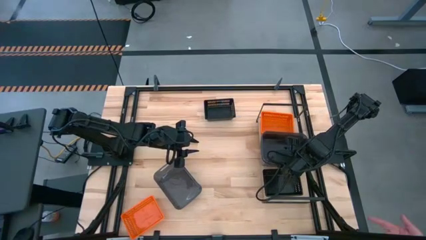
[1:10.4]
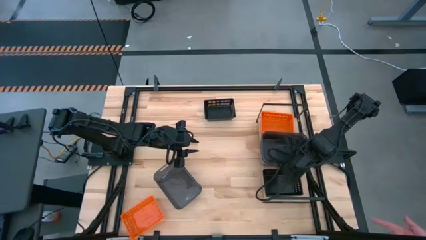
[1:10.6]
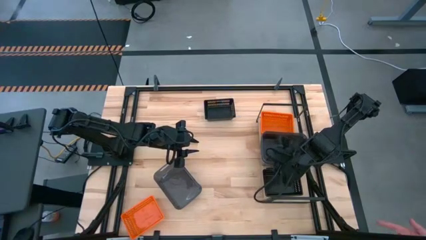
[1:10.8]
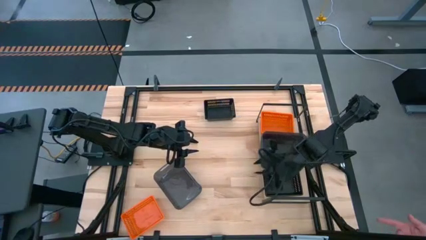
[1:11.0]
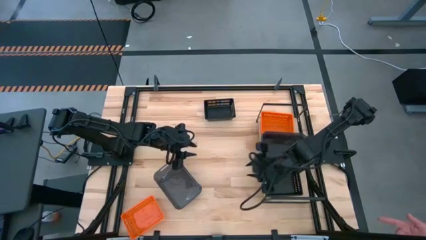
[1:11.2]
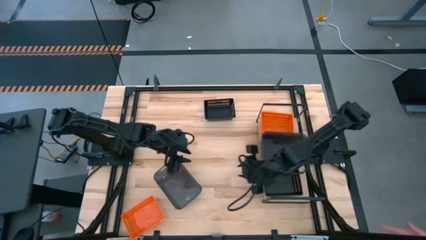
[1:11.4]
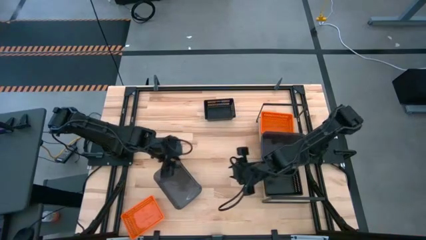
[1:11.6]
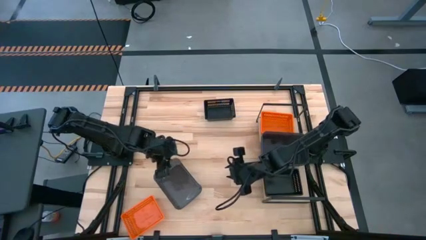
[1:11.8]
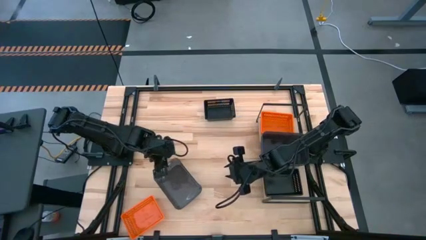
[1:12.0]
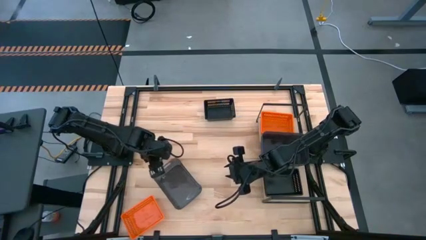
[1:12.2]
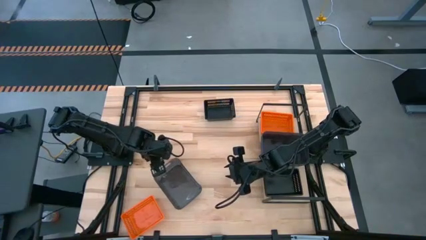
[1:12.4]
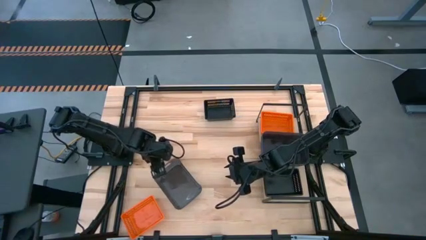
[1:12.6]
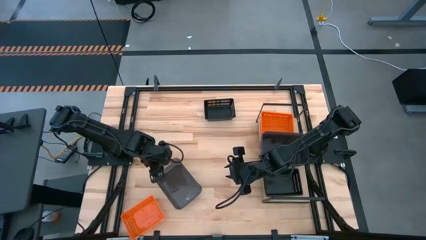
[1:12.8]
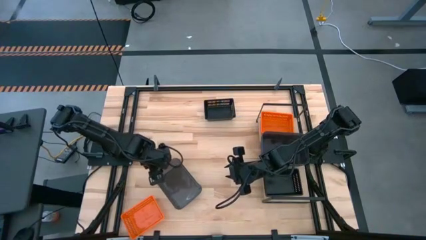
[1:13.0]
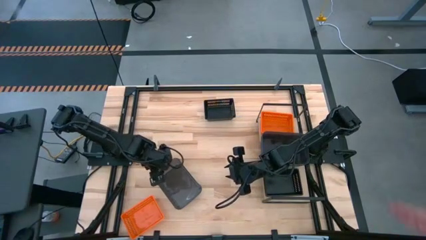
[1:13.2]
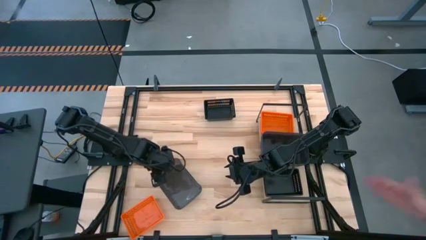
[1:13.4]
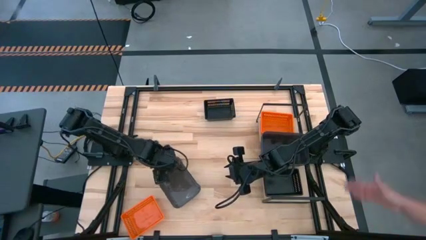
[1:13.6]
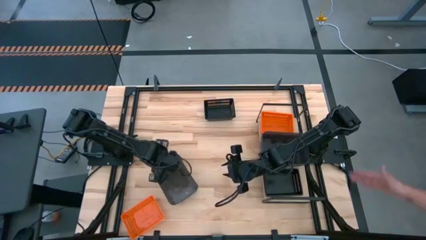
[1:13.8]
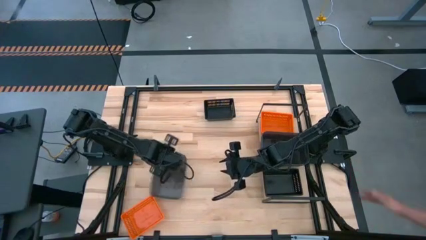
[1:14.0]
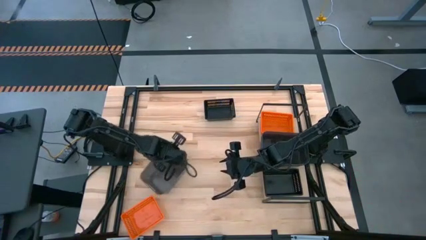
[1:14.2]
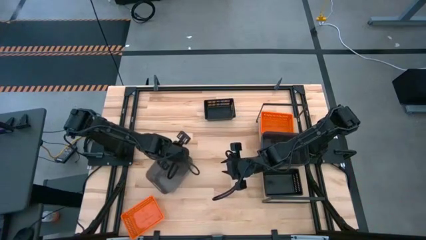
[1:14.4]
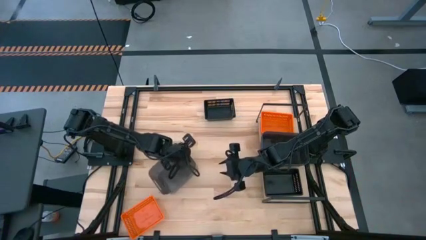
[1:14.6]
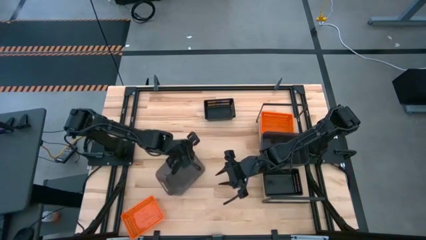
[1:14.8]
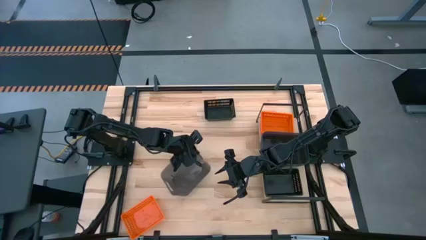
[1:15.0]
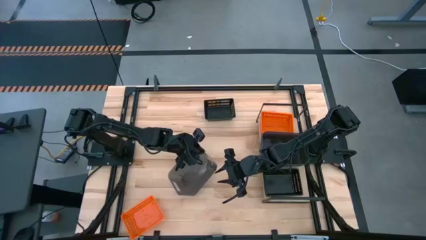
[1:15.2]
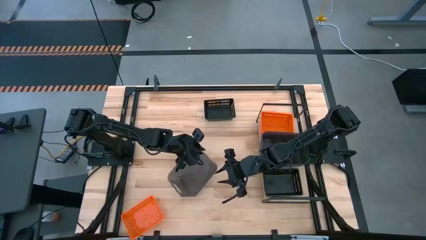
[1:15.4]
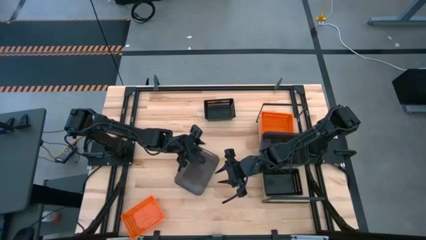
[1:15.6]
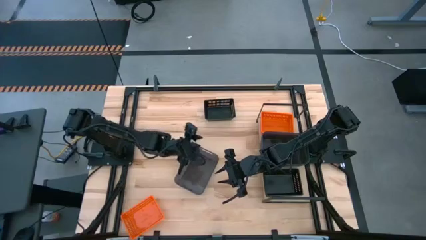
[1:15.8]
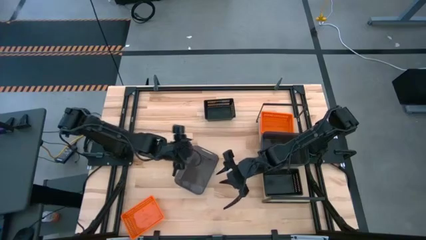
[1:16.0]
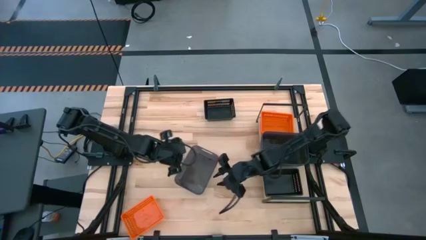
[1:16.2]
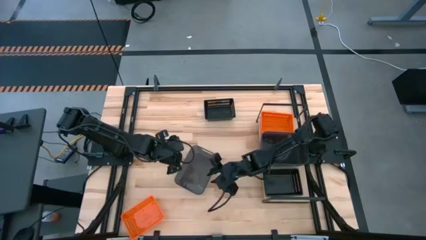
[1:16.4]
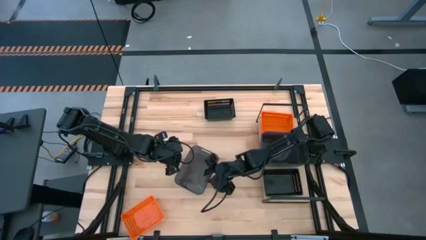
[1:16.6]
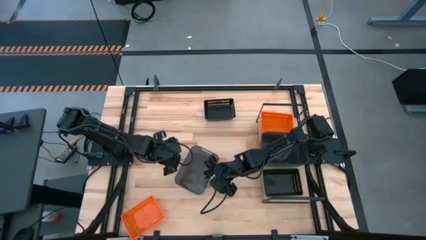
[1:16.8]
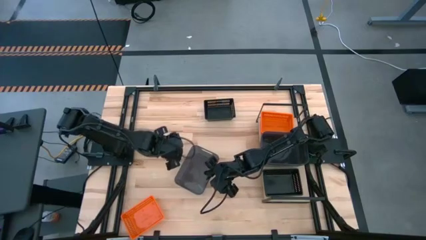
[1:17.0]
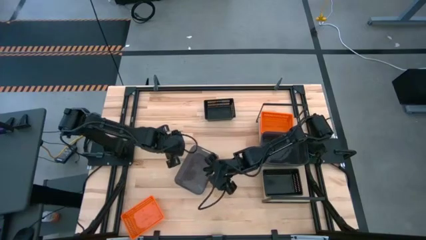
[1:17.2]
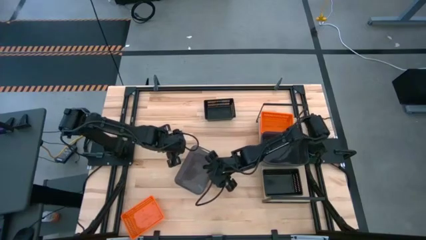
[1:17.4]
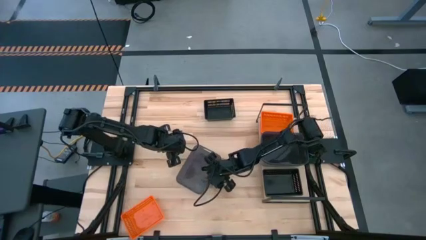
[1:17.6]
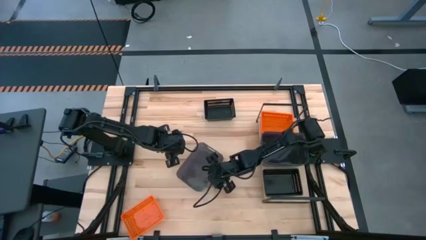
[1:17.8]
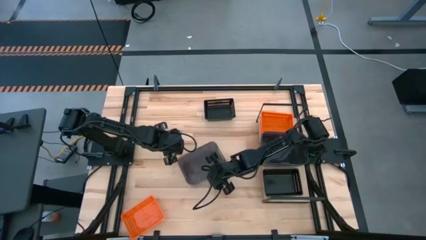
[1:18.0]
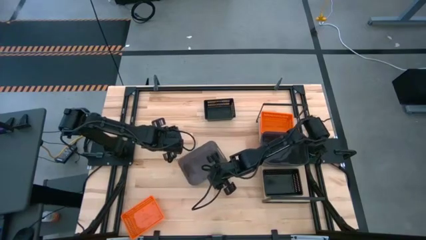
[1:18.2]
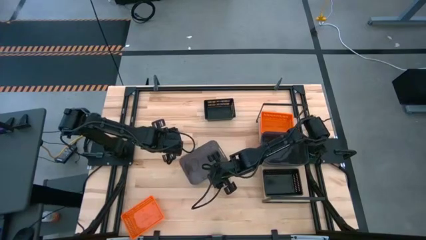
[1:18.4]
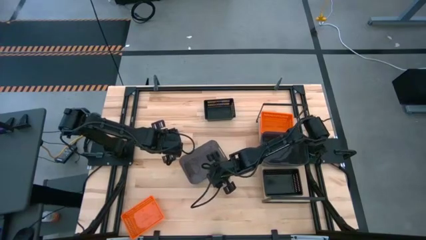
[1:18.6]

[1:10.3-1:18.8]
Task: Stack baskets on shelf by color
Stack the black transparent bin on top of the black transparent bin on the shelf

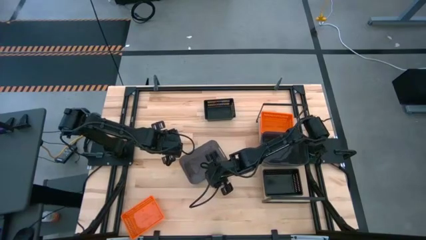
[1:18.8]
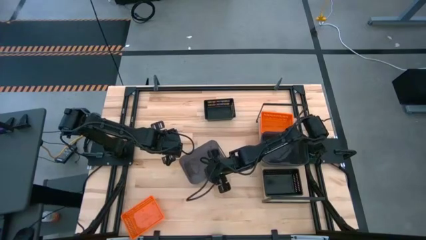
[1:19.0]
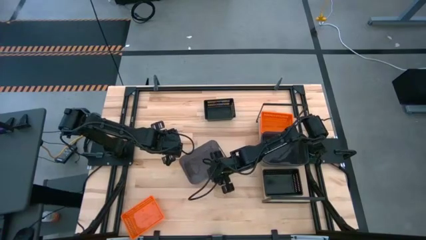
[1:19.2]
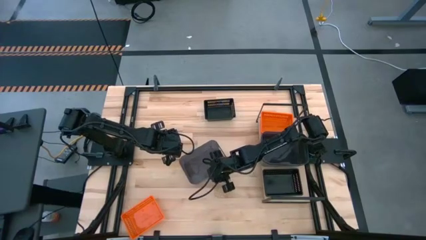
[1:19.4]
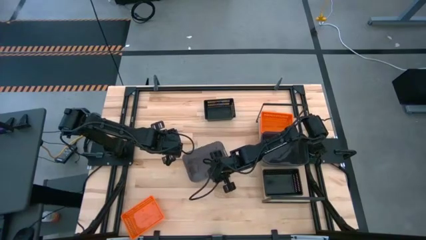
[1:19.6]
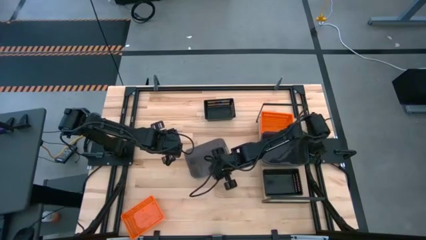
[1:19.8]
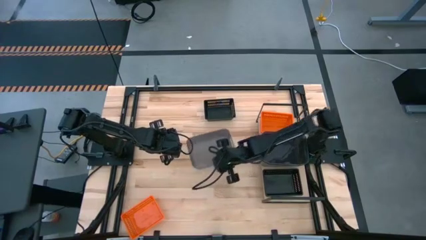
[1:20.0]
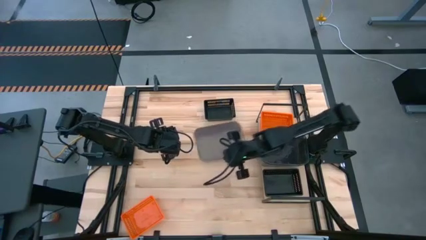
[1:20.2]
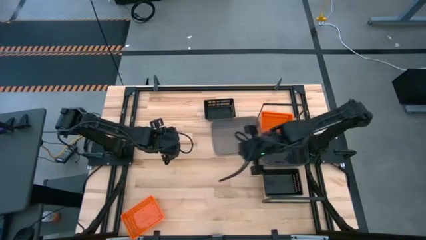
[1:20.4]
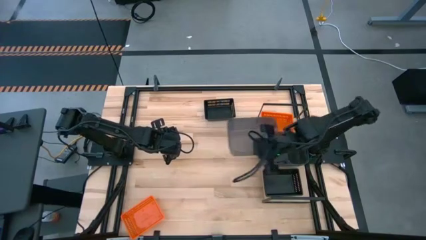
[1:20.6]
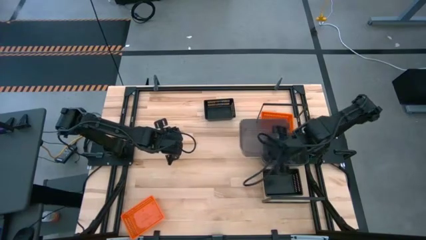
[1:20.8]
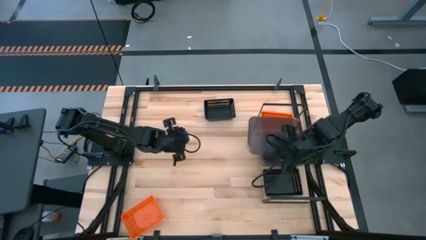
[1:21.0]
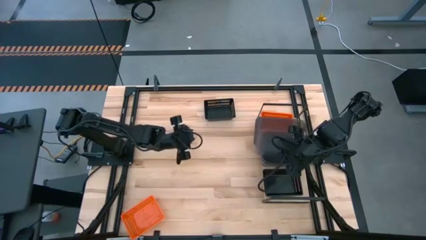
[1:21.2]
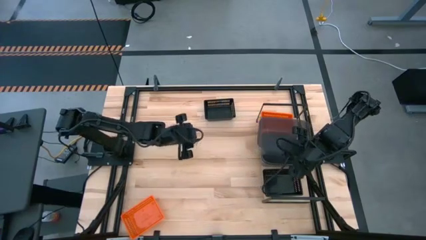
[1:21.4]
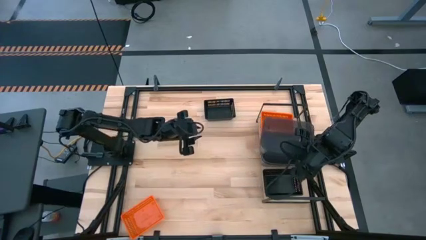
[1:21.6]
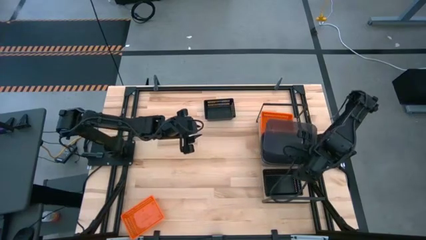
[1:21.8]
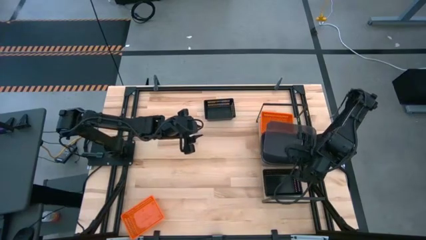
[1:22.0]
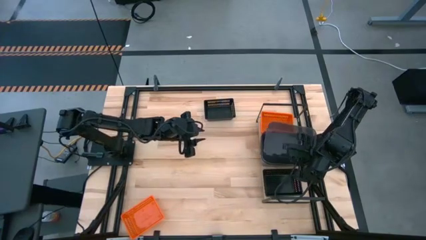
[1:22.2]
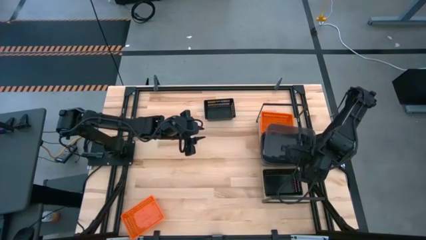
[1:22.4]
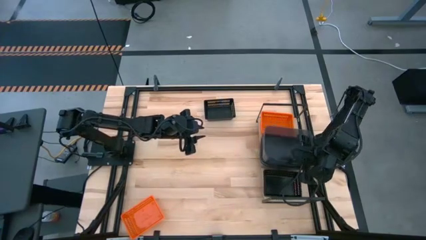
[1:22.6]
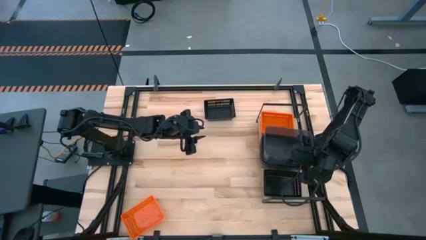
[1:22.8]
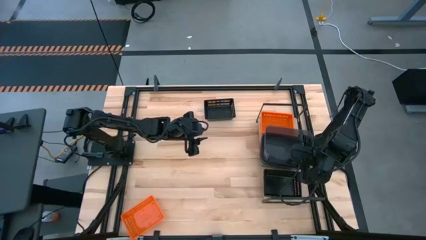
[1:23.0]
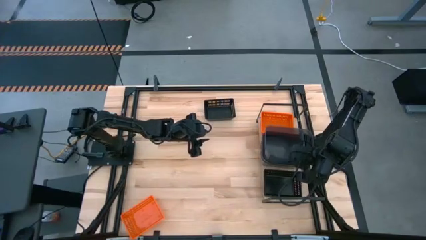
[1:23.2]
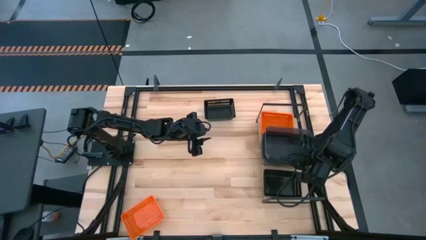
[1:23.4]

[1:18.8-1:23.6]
Stack the black transparent bin on top of the black transparent bin on the shelf
